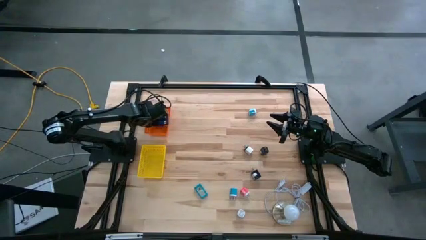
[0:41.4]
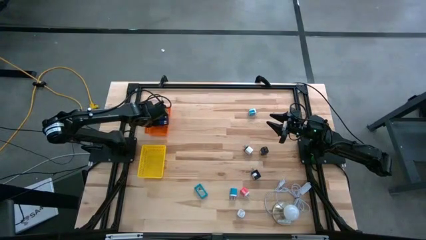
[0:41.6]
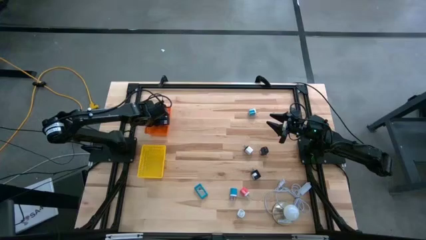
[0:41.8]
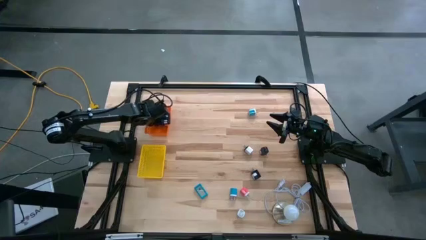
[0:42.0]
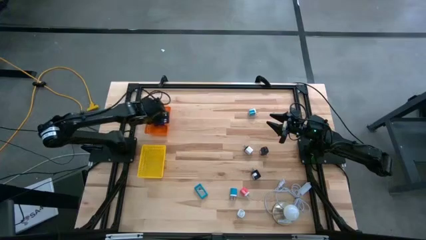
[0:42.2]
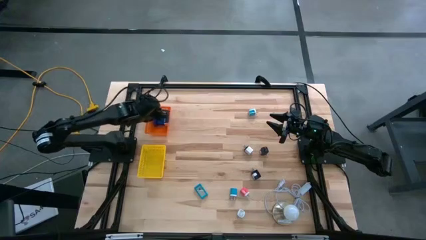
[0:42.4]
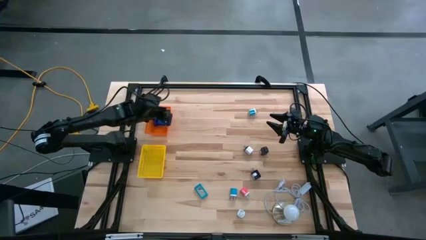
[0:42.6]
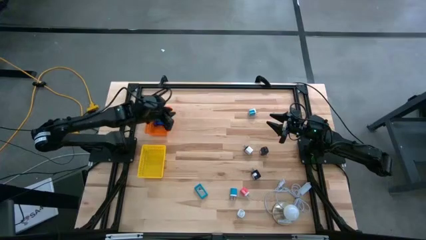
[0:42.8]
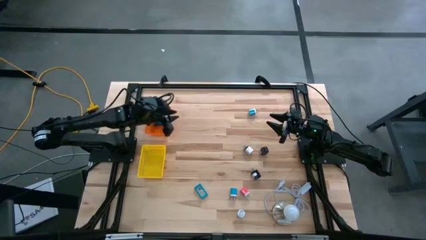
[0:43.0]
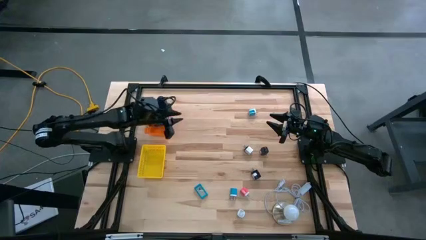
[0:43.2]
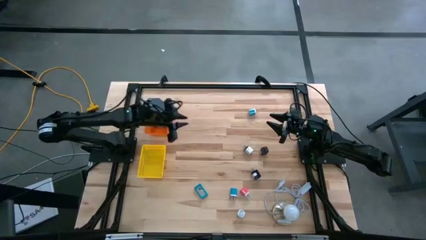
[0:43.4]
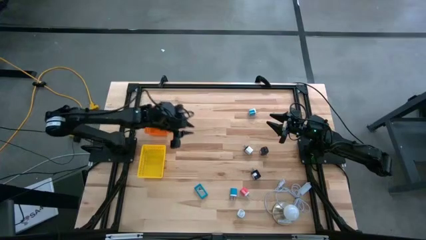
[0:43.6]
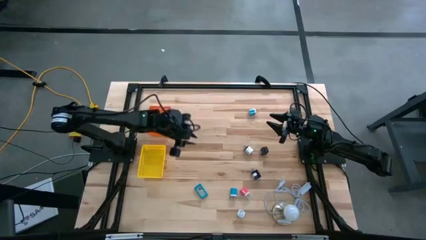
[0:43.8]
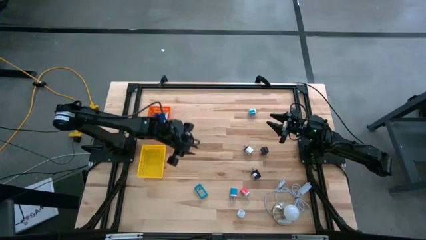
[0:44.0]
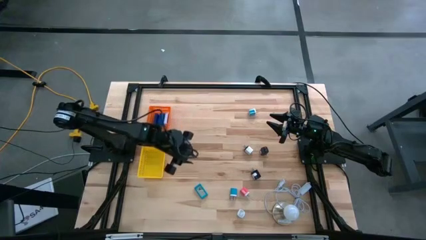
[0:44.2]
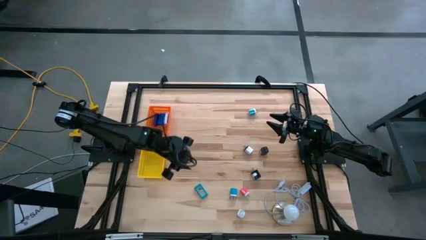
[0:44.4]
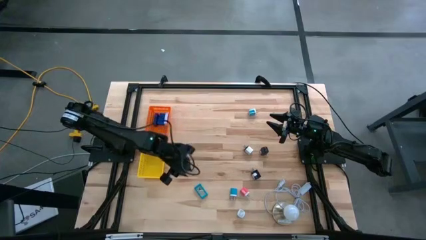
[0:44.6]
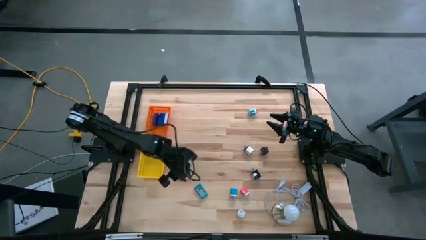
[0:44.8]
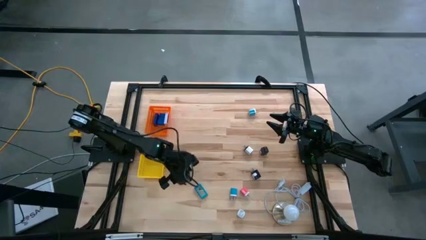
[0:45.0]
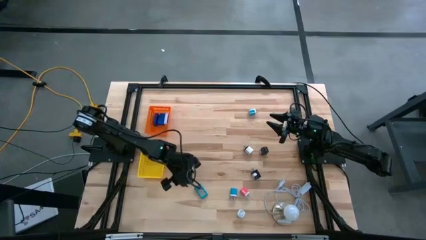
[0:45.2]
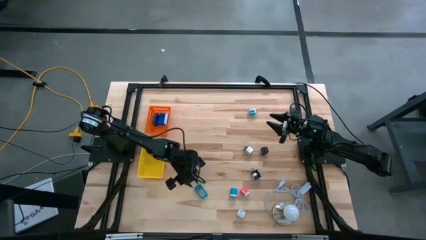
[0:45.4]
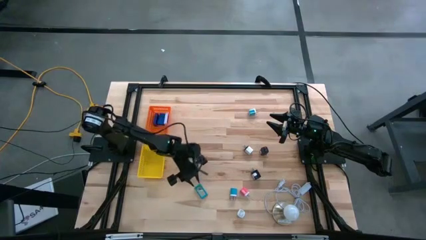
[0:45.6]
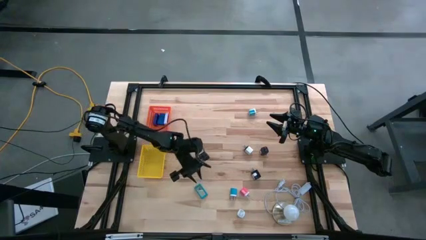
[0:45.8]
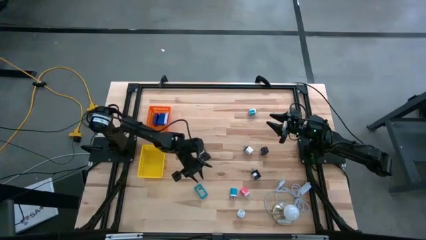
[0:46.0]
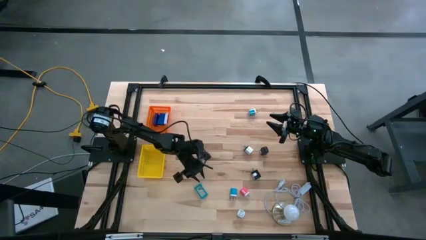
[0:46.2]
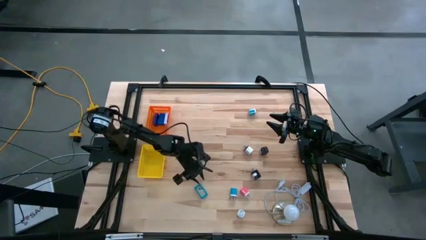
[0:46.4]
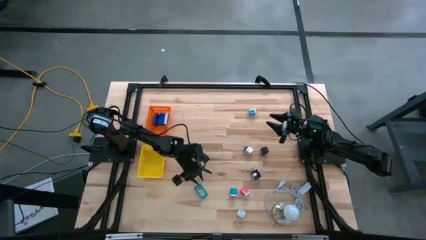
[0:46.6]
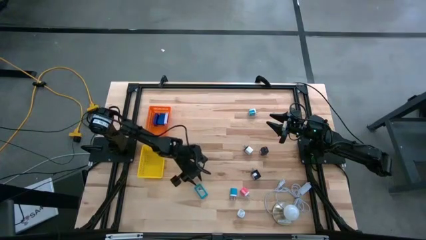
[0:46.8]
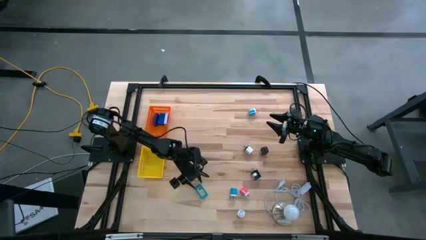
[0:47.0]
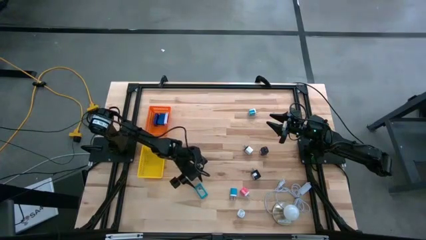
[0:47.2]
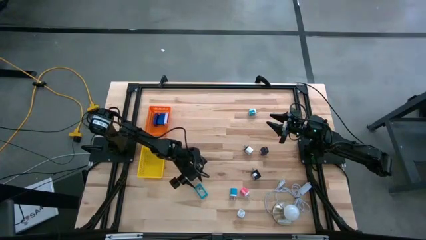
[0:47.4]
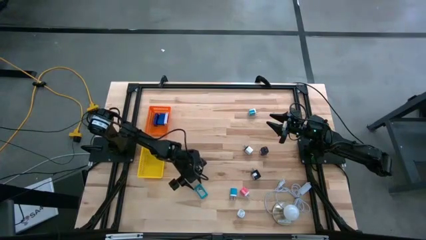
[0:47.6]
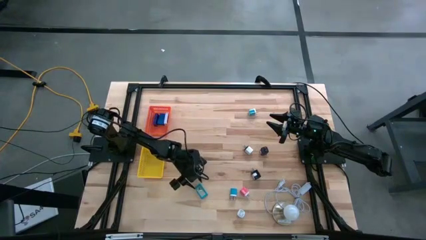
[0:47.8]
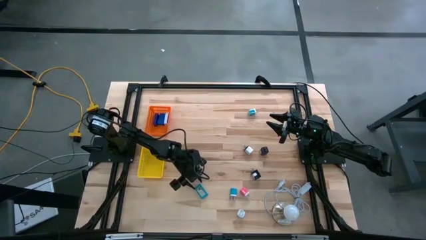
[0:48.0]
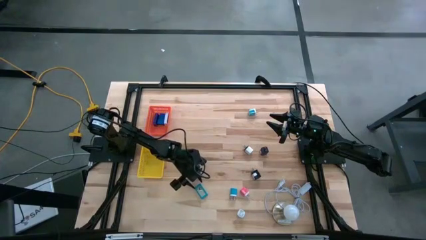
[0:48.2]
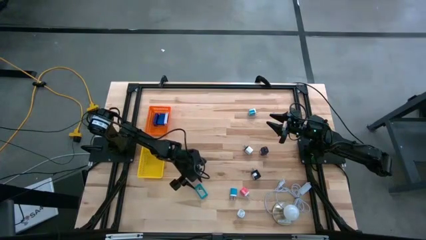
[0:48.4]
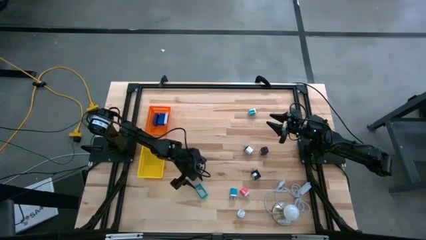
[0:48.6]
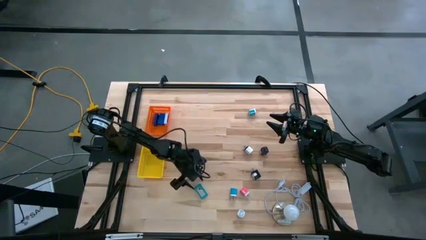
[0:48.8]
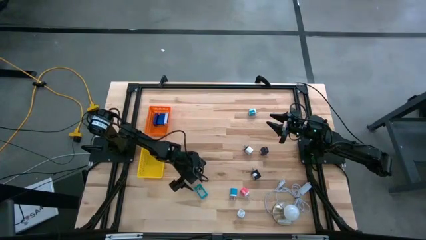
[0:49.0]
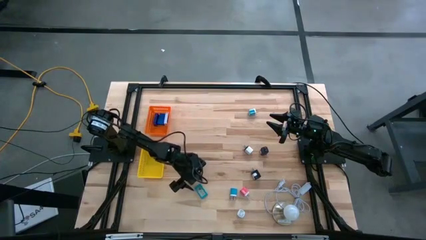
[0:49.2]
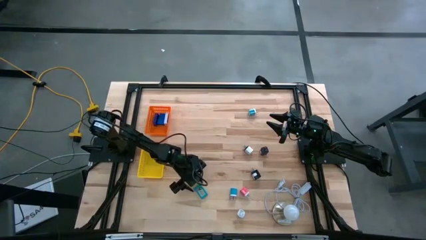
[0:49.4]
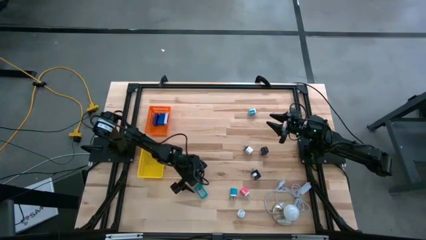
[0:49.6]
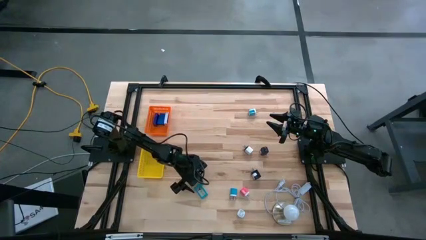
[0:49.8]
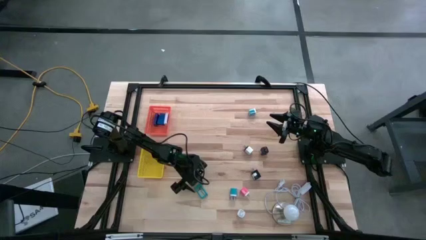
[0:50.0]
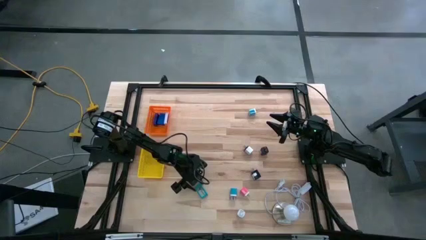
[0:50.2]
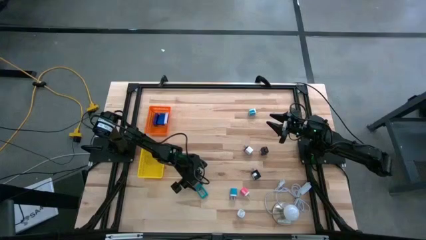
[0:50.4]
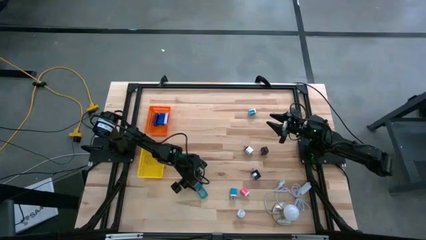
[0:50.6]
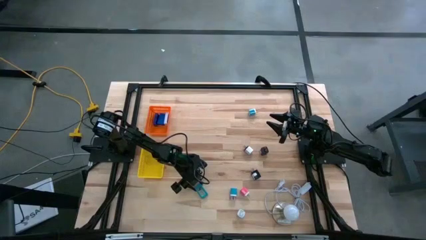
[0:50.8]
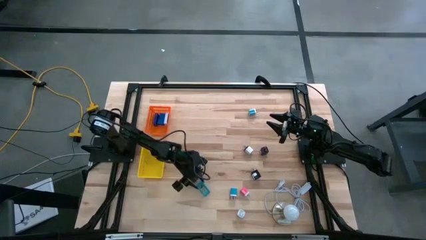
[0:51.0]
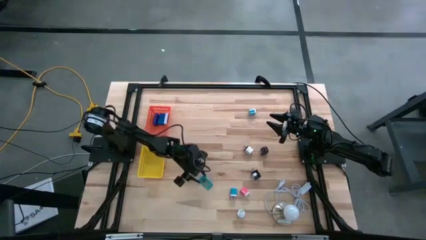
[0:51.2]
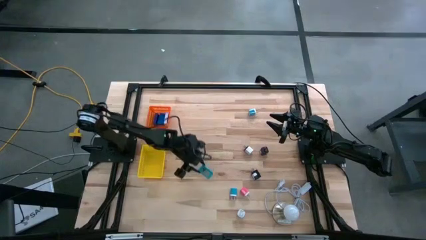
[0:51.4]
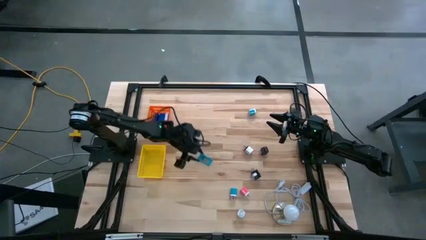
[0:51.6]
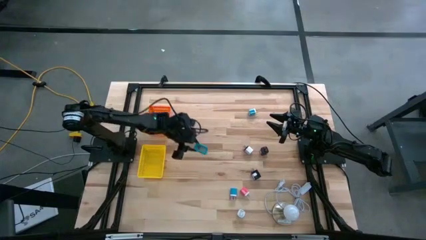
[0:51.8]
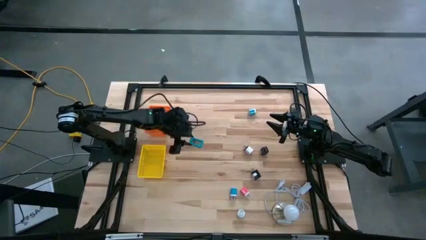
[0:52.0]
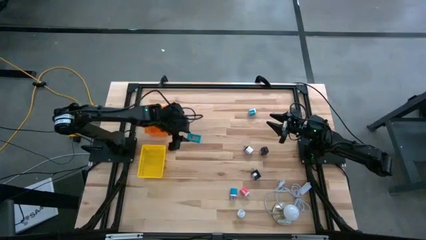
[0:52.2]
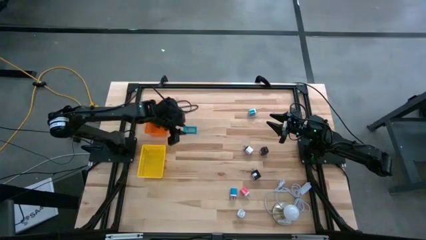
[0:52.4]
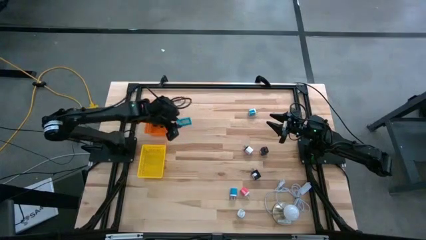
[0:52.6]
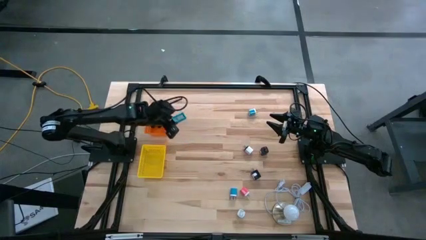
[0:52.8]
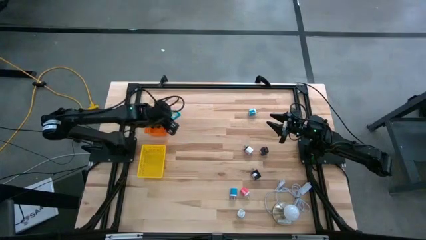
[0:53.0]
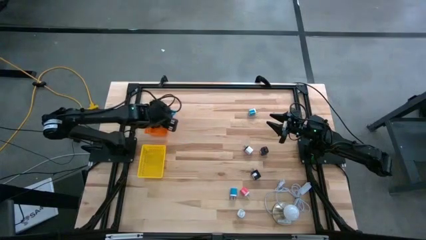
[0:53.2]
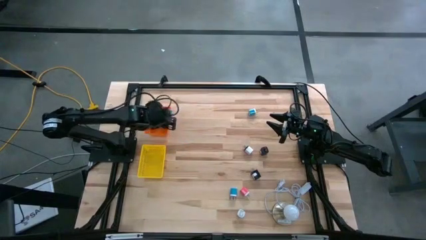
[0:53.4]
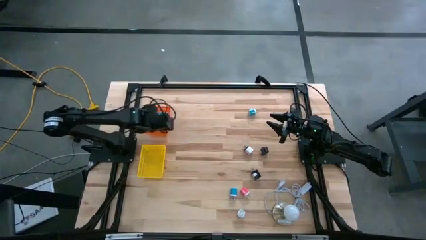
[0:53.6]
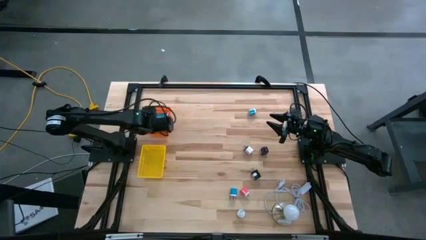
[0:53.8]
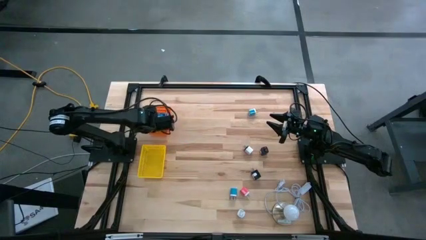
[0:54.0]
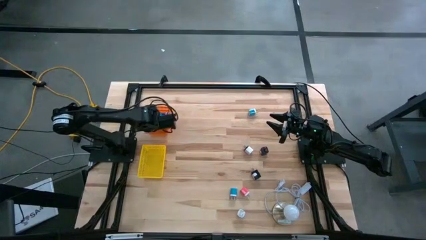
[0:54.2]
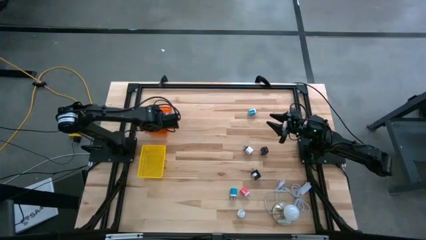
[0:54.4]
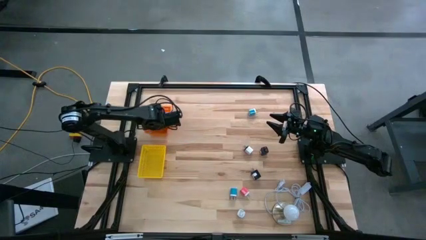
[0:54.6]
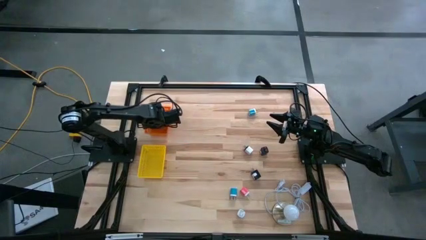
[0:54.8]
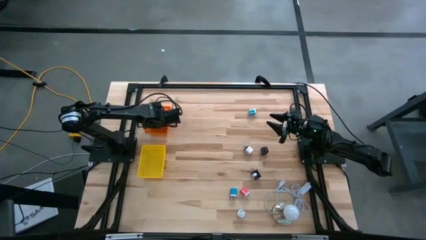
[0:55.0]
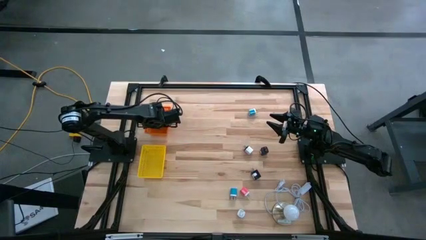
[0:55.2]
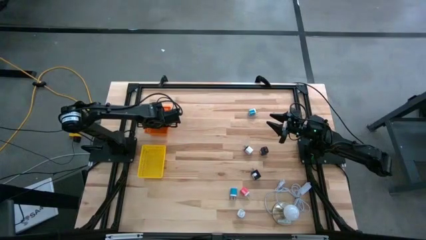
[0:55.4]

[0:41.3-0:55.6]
Task: Pick & Place Office items
Put the blue timer into the orange basket

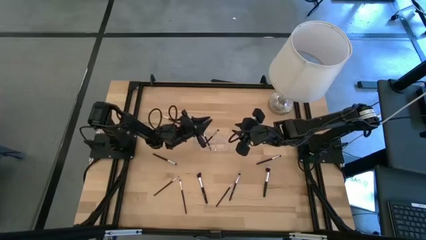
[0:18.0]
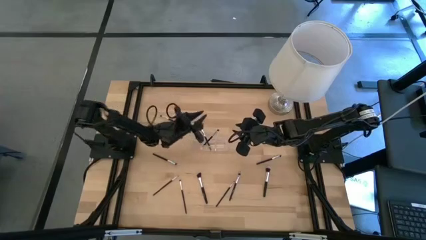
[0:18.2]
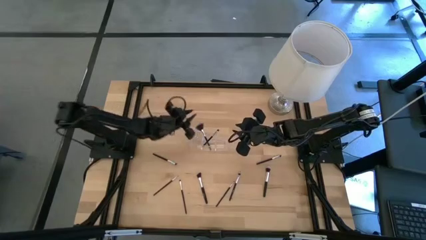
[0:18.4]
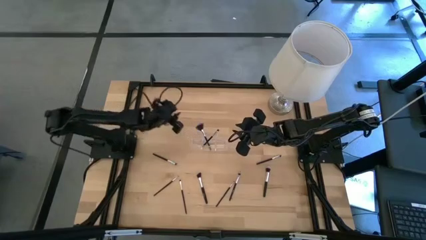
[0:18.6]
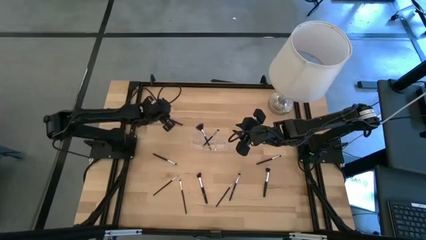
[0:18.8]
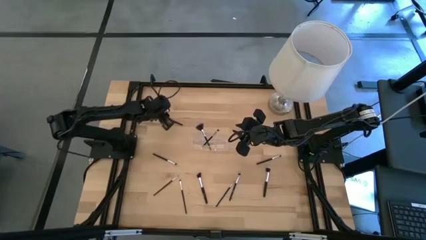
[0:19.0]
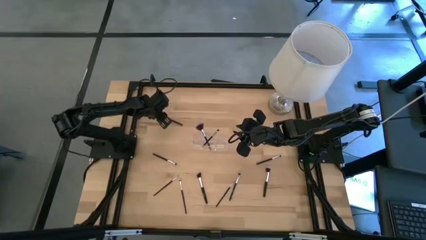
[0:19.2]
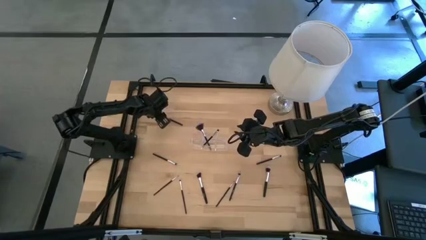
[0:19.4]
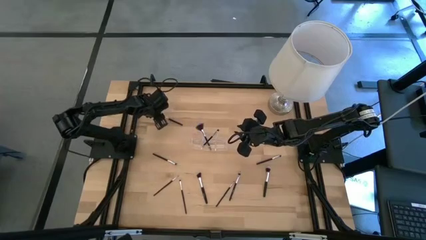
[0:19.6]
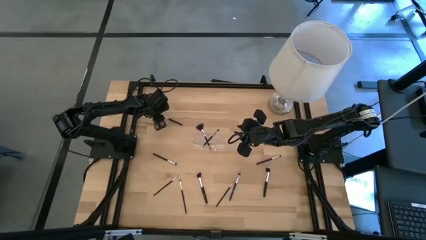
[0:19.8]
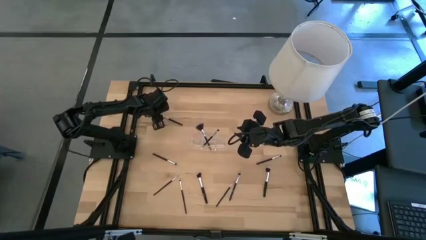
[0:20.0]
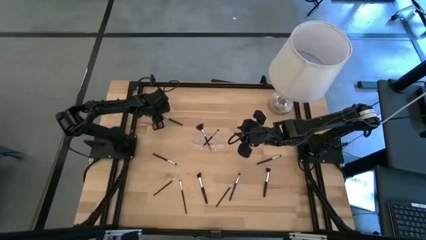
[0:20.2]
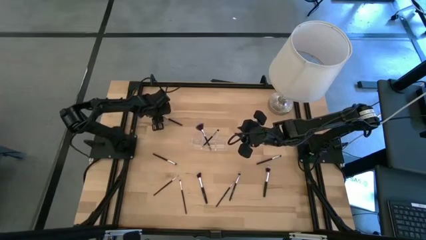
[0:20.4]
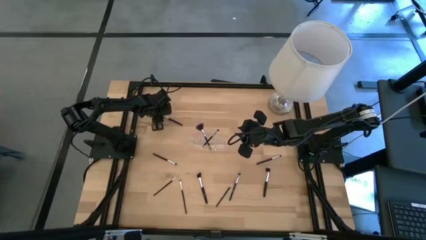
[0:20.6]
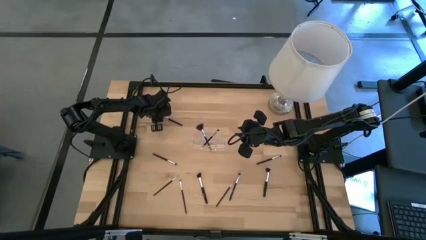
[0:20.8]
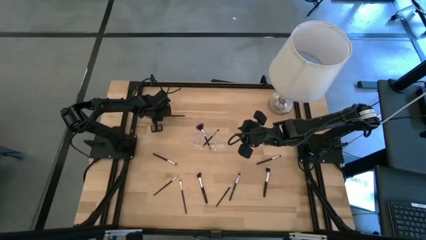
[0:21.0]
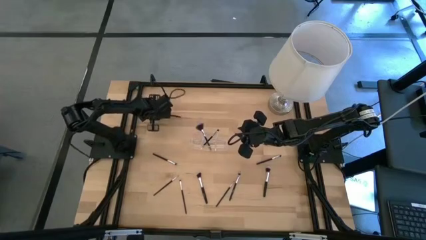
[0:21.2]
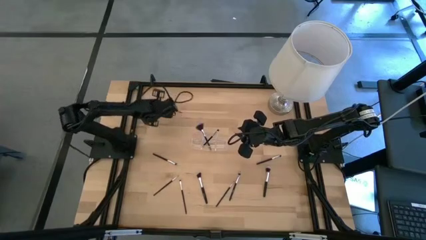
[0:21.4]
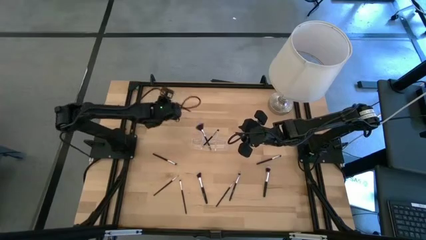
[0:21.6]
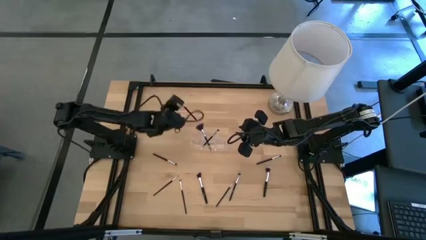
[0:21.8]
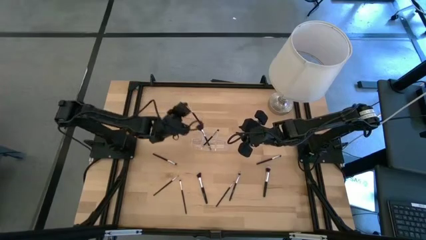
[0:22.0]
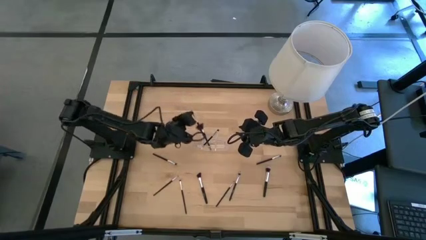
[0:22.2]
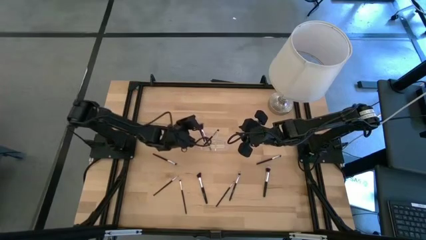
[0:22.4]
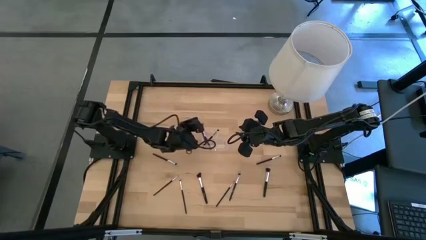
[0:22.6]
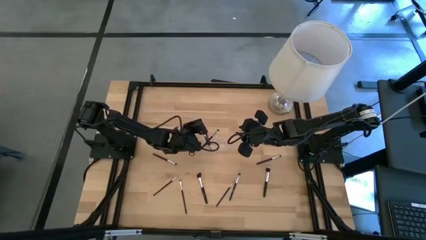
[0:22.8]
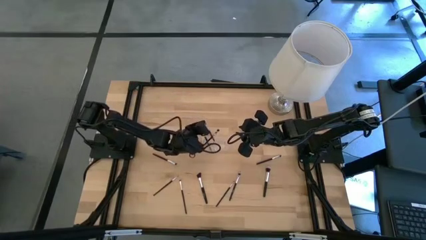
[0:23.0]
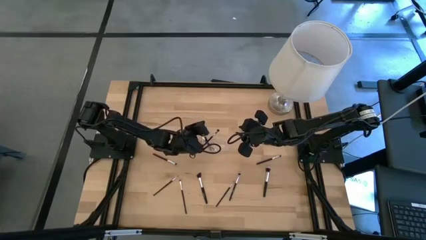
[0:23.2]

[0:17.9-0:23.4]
Task: Put items in baskets/containers
Put the eyeshadow brush into the transparent organizer
